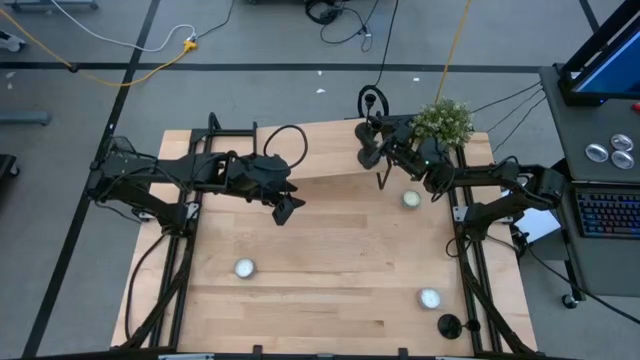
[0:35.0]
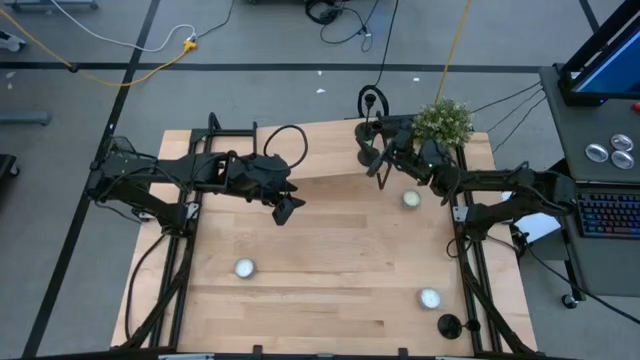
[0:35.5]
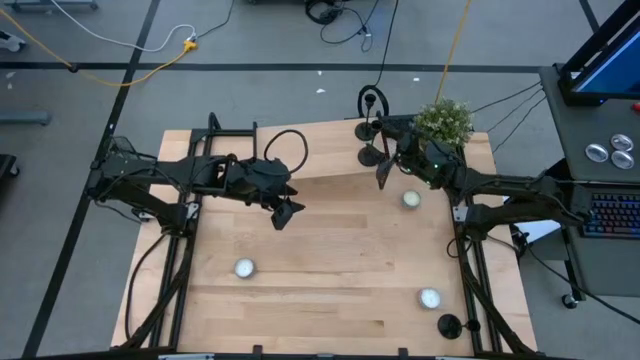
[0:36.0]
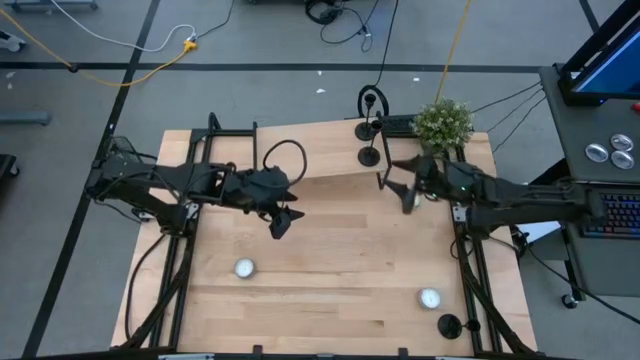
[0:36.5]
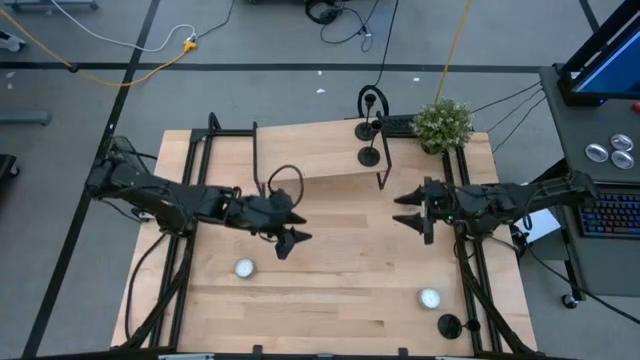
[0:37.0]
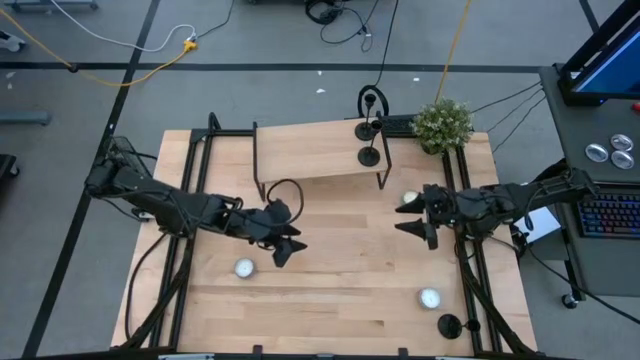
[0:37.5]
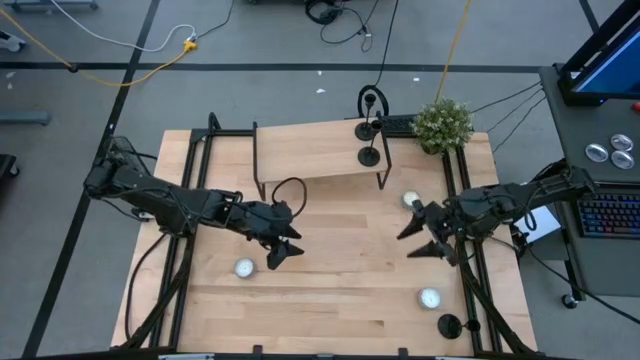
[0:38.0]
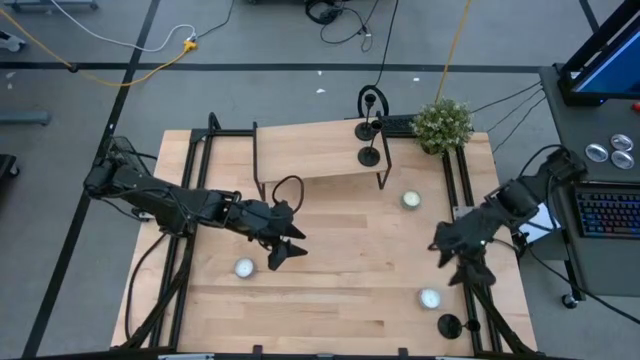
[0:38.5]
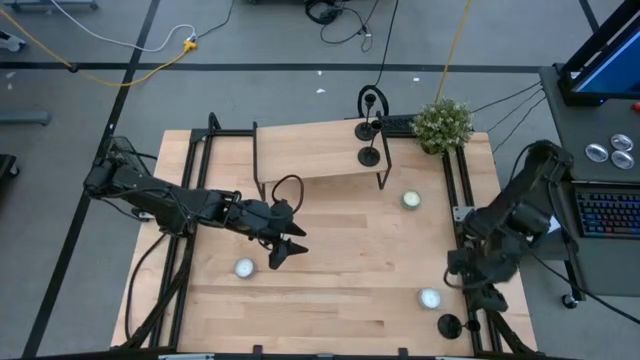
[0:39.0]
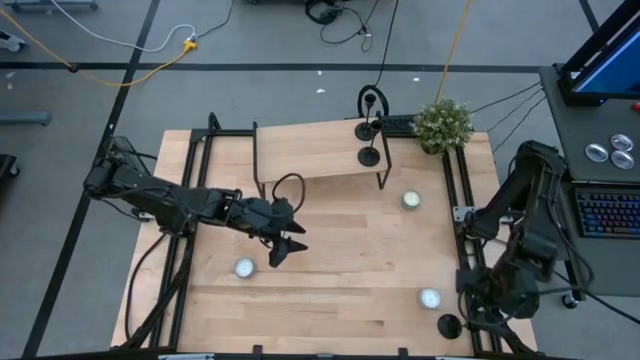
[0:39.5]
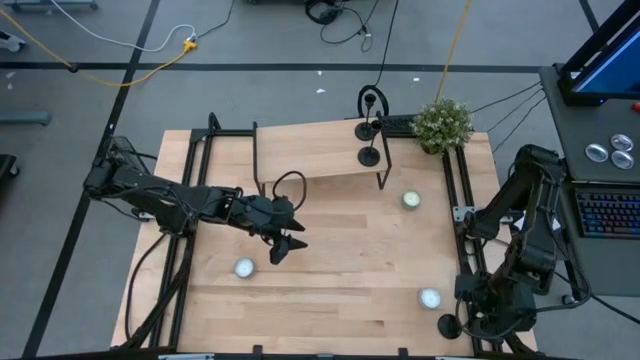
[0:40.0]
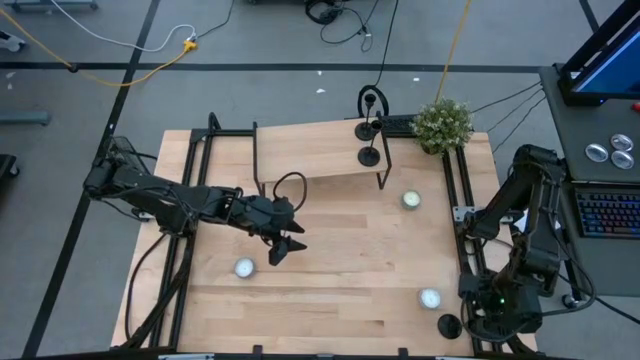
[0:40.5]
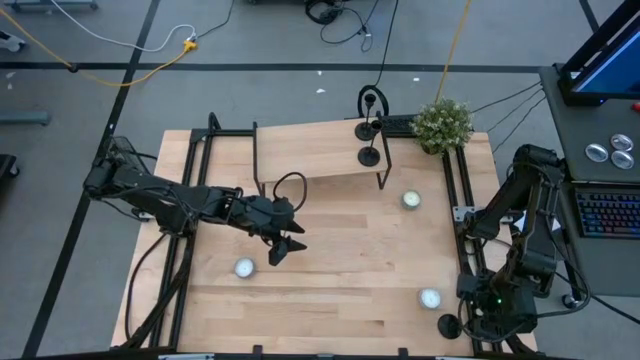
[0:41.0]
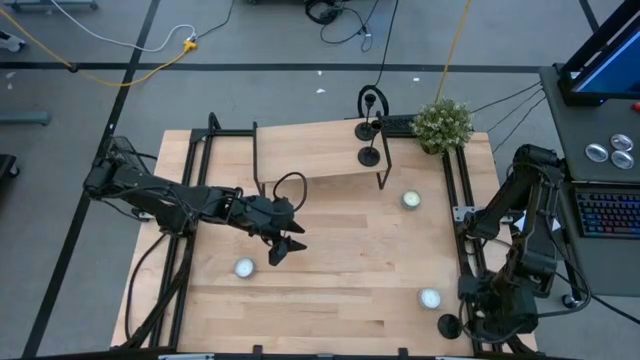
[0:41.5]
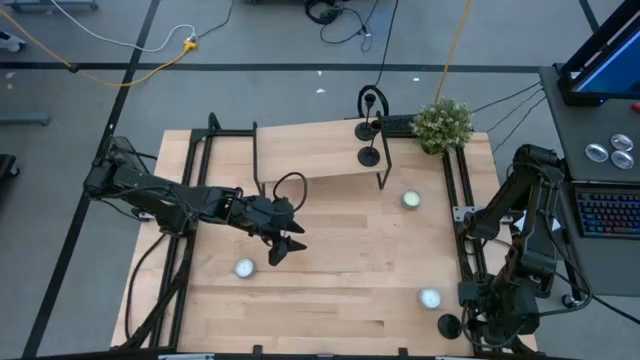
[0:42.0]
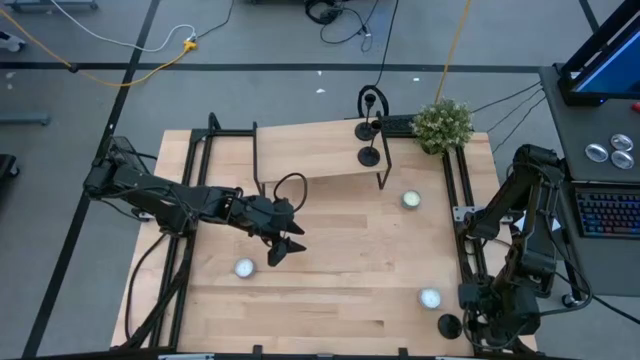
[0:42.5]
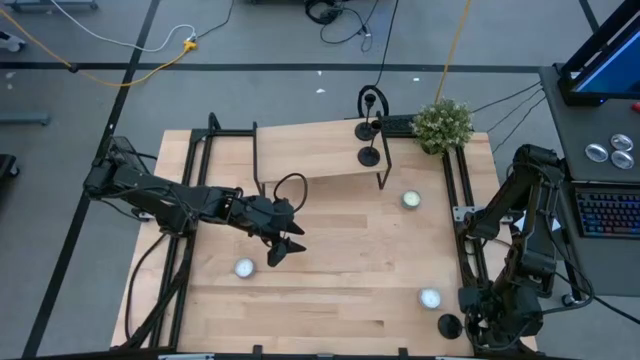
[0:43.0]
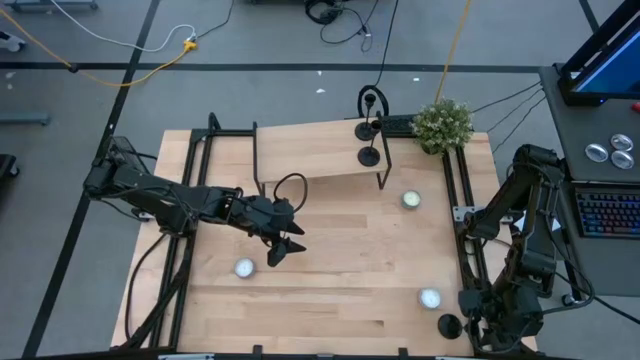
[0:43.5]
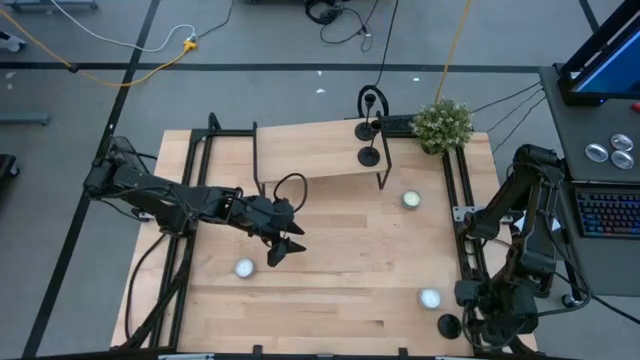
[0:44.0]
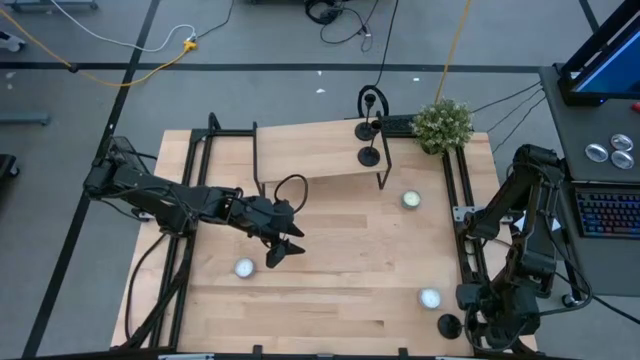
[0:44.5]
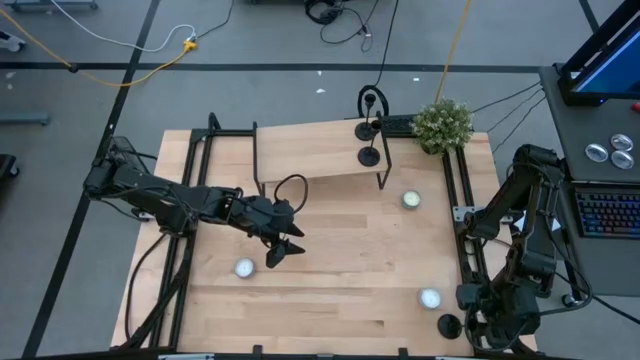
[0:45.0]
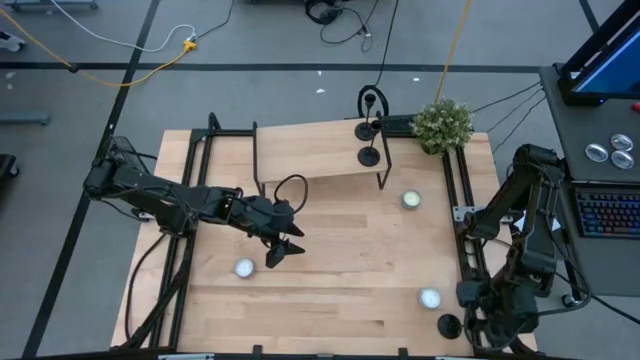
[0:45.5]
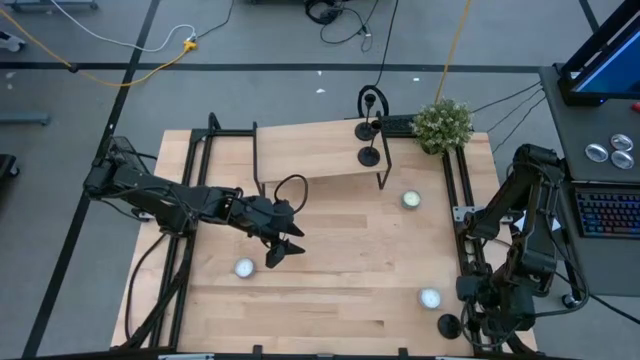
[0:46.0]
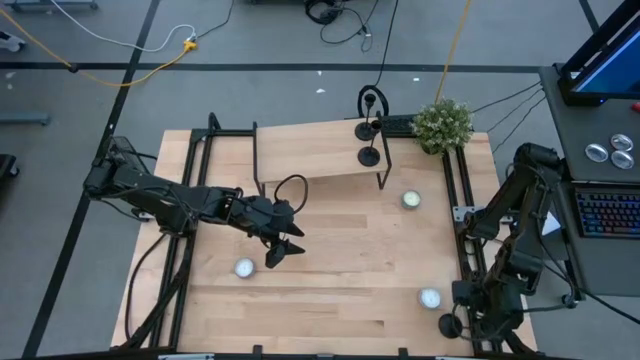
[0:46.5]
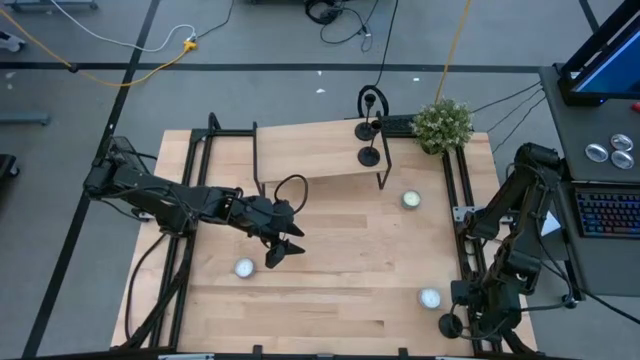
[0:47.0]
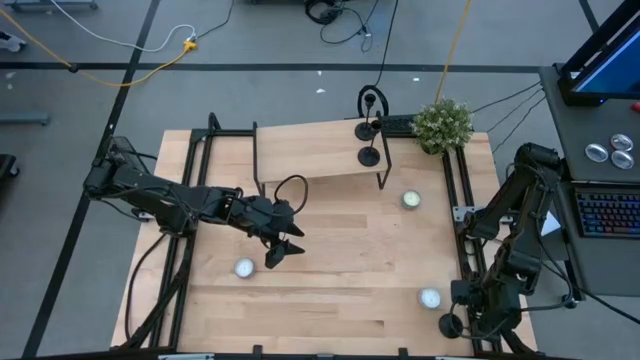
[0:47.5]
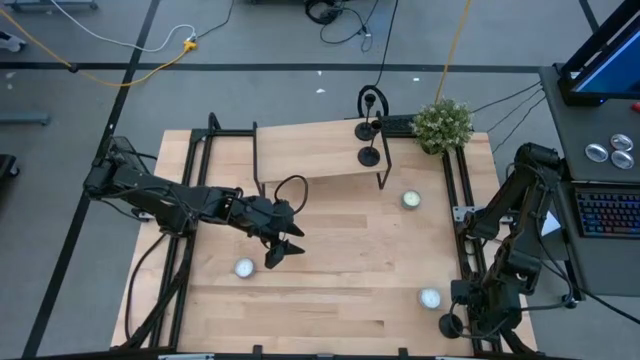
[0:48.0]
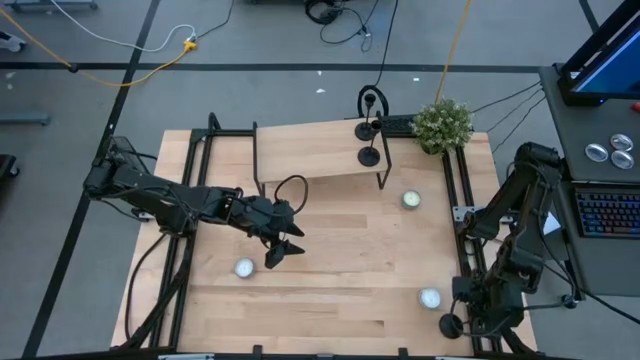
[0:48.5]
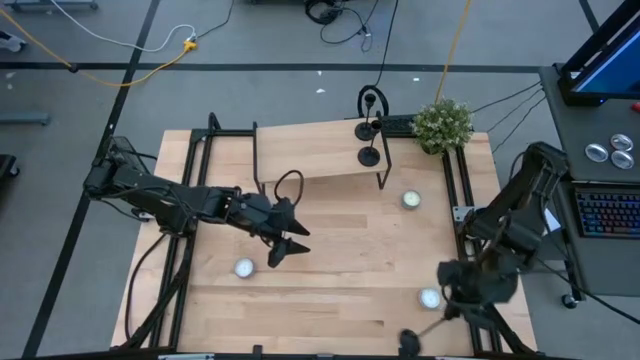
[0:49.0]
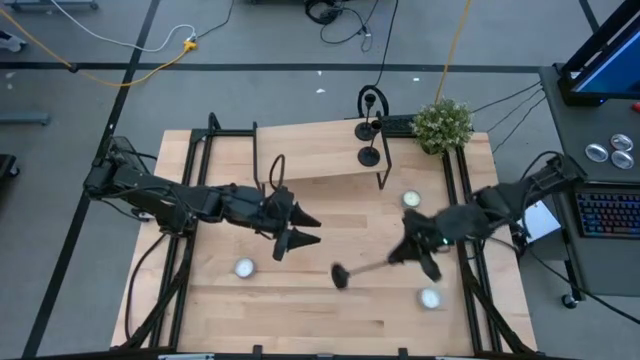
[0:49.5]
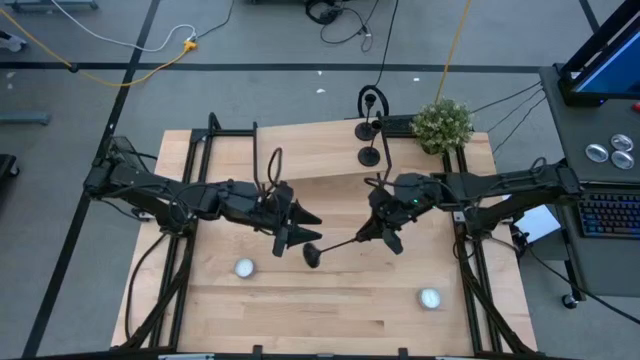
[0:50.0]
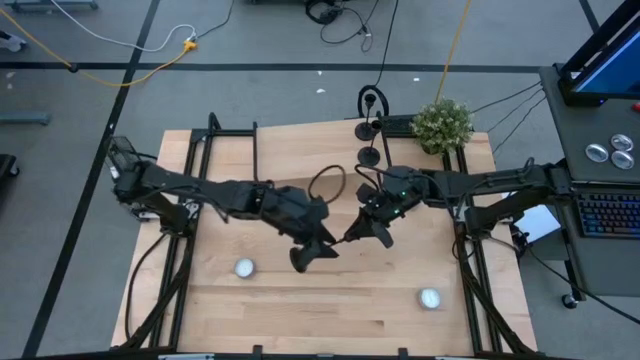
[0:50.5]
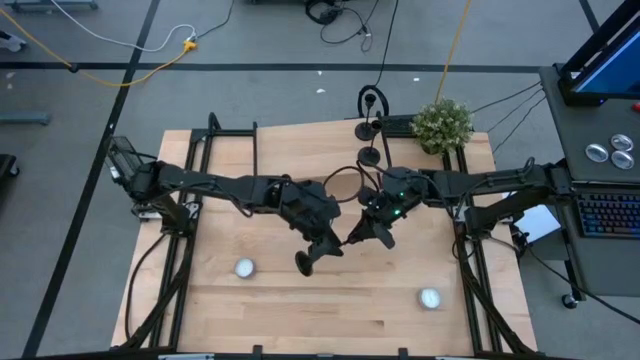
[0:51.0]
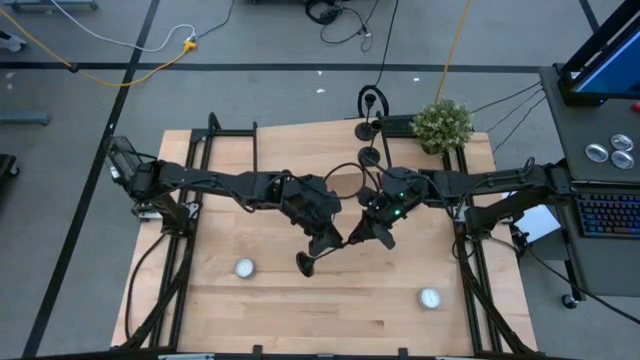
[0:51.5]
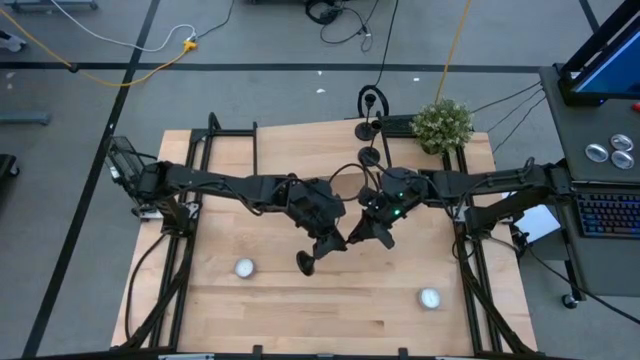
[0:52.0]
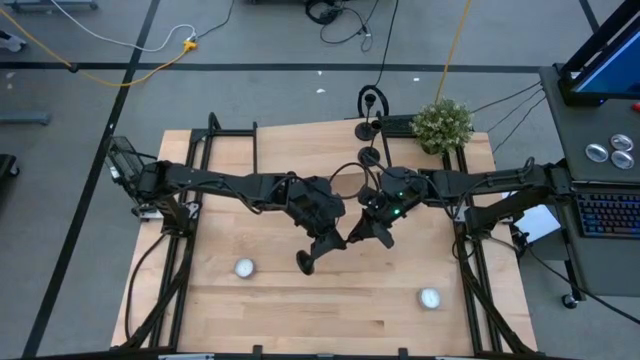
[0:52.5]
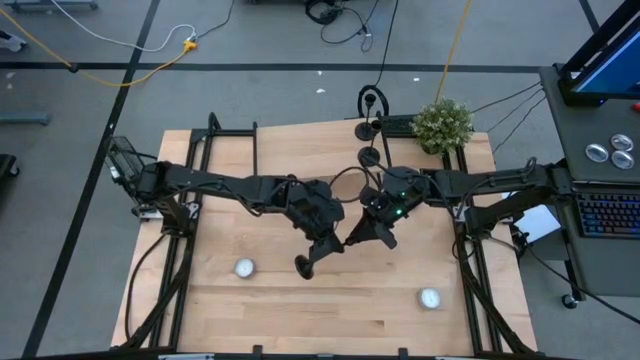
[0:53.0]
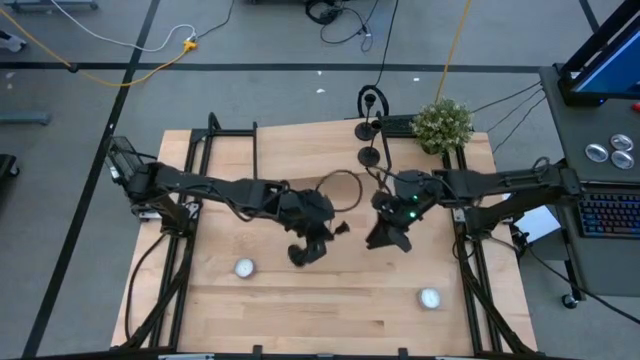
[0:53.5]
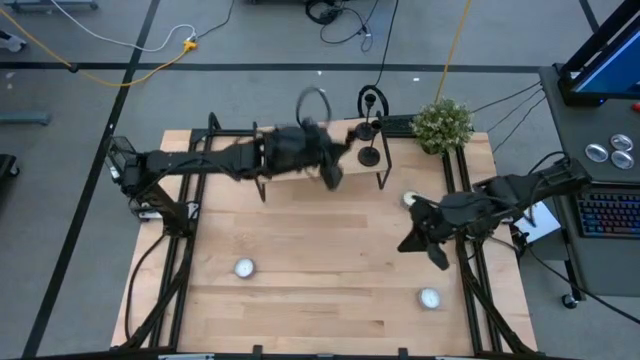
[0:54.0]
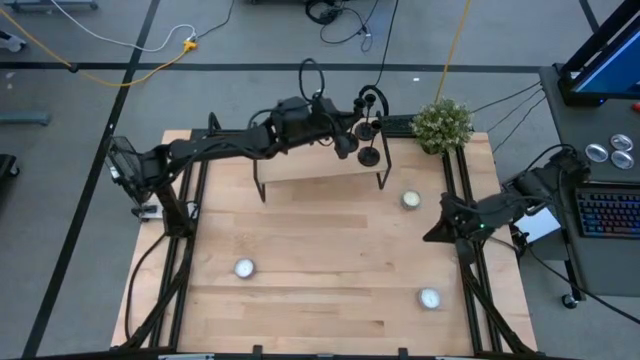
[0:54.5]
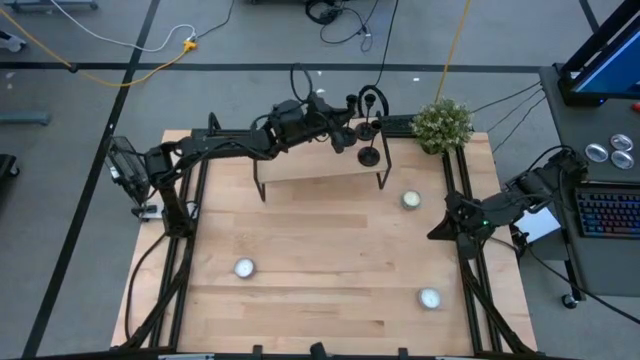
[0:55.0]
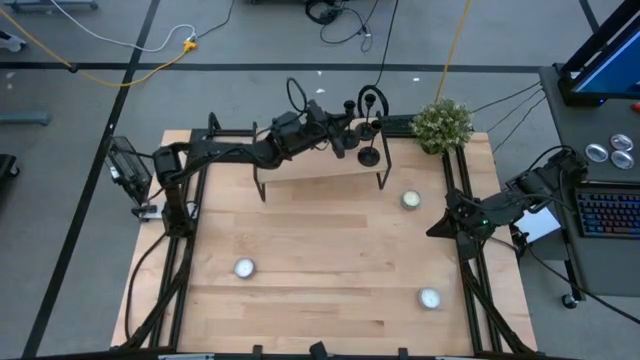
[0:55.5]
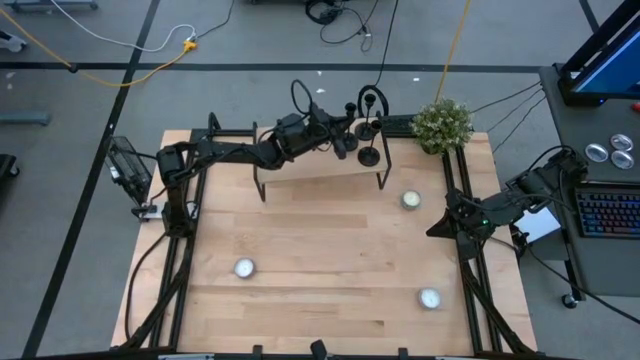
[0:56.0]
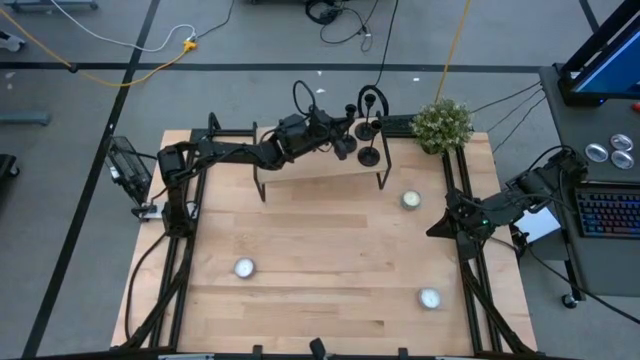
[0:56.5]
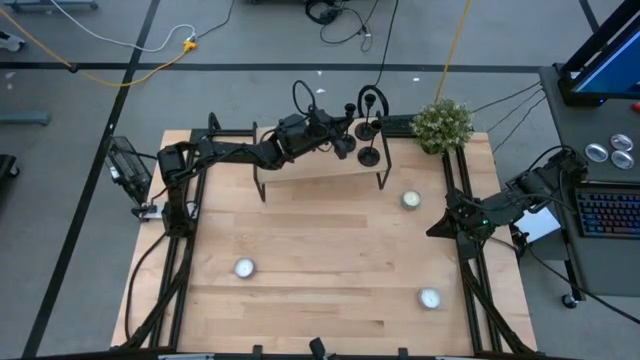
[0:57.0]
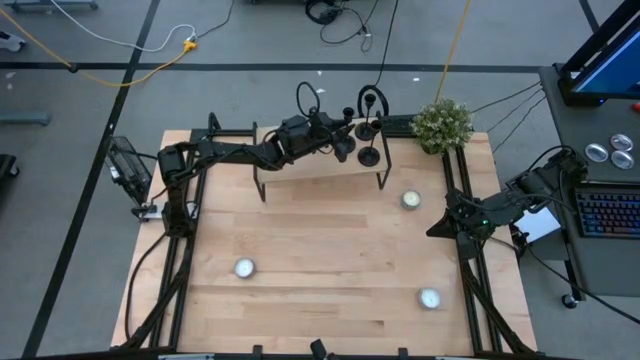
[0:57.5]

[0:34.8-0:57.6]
Task: Pick & Place candle stick holders
Put the black candle holder on the shelf
